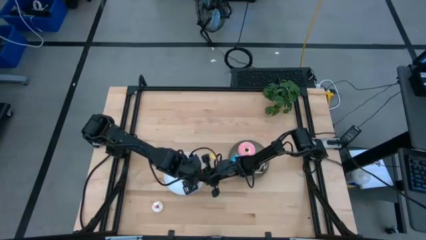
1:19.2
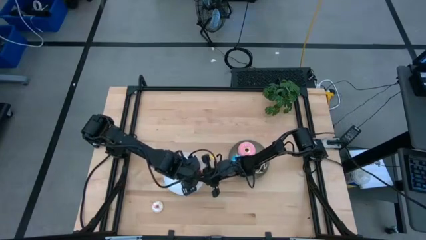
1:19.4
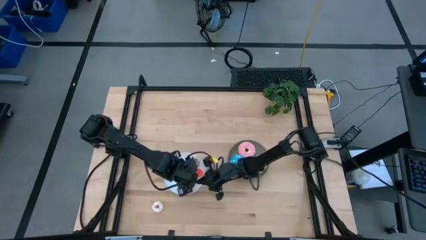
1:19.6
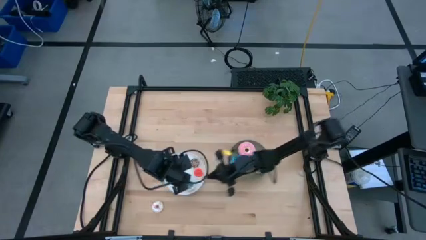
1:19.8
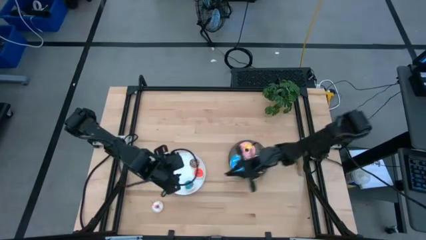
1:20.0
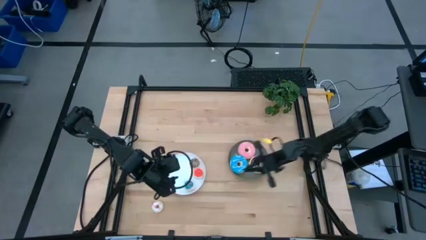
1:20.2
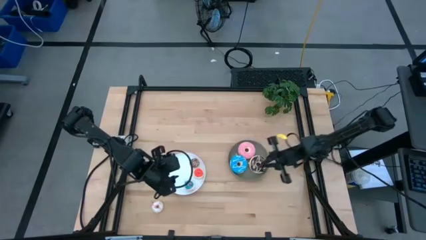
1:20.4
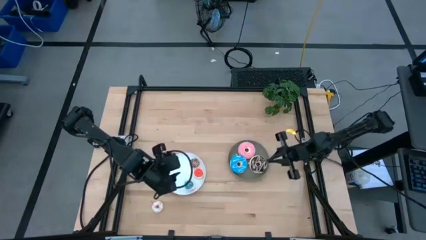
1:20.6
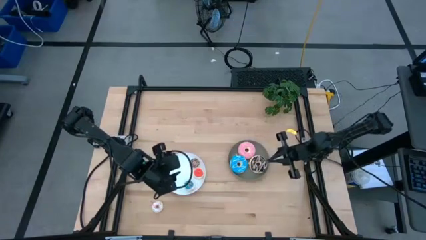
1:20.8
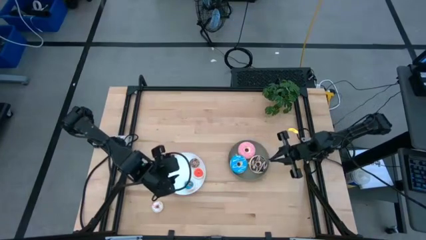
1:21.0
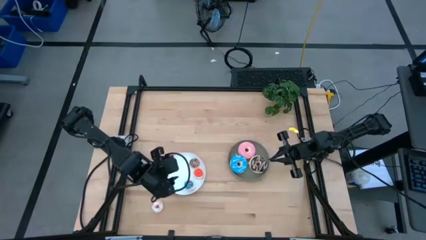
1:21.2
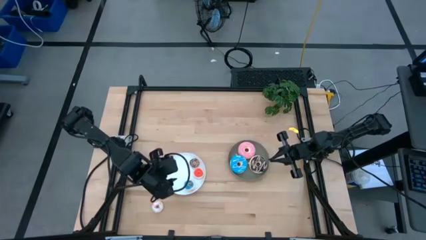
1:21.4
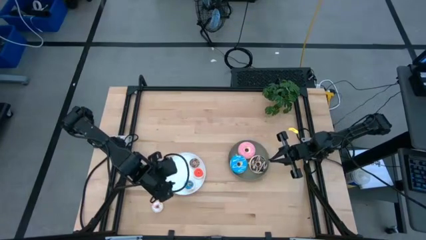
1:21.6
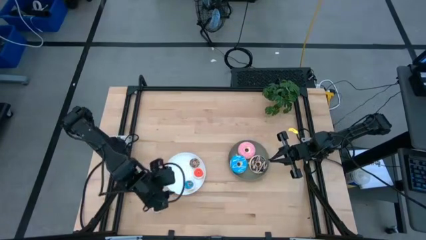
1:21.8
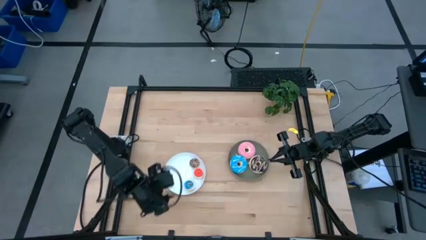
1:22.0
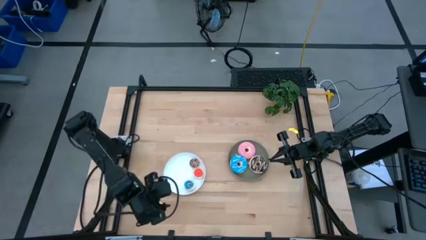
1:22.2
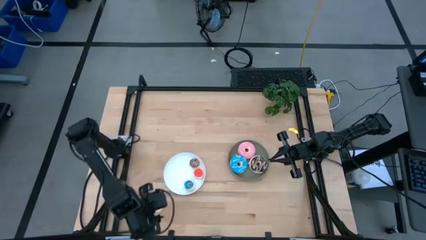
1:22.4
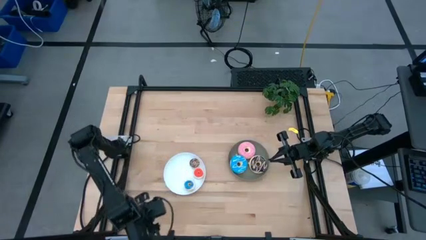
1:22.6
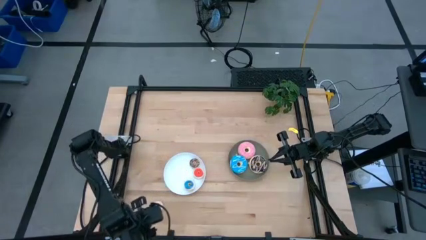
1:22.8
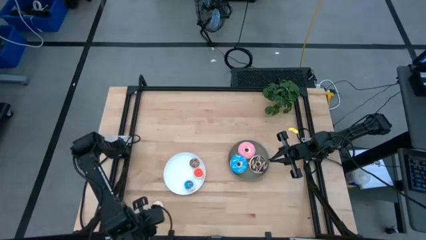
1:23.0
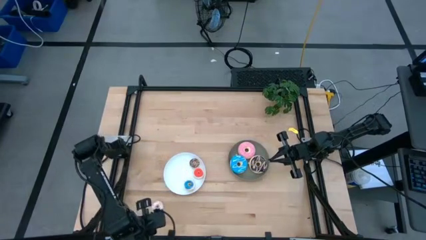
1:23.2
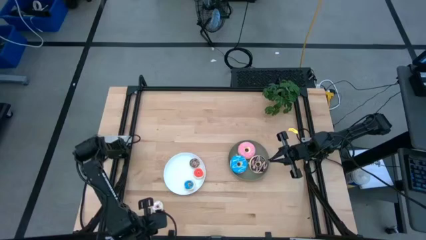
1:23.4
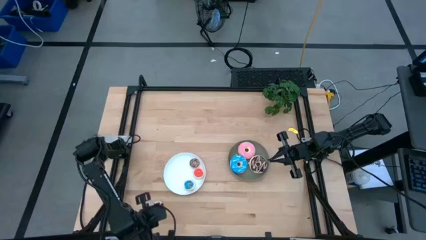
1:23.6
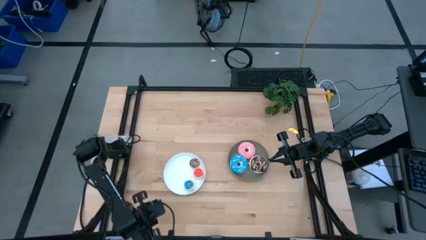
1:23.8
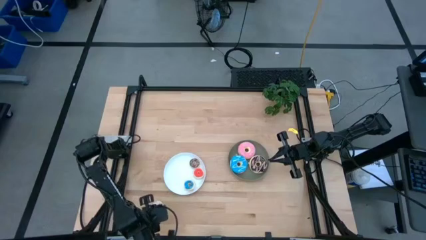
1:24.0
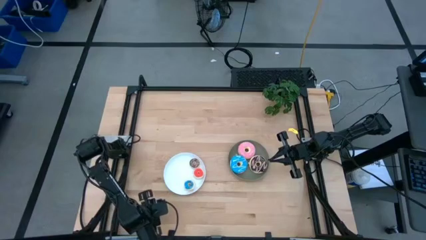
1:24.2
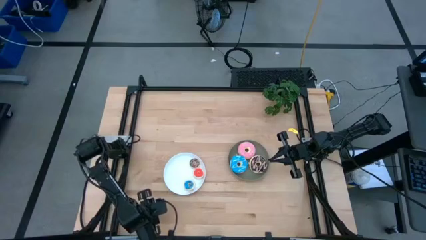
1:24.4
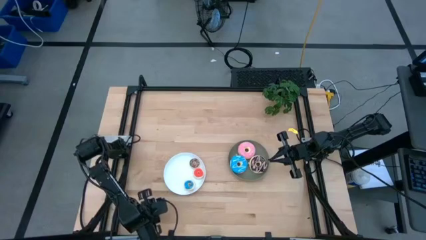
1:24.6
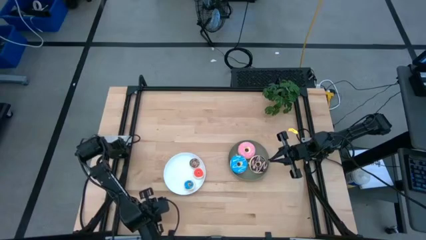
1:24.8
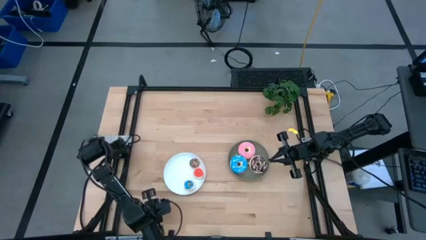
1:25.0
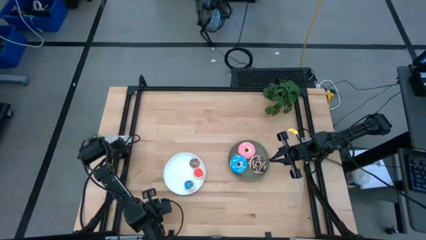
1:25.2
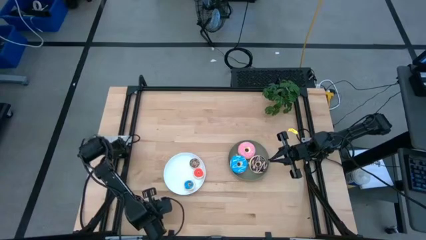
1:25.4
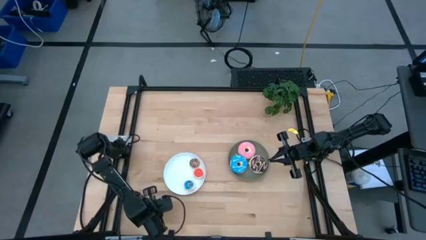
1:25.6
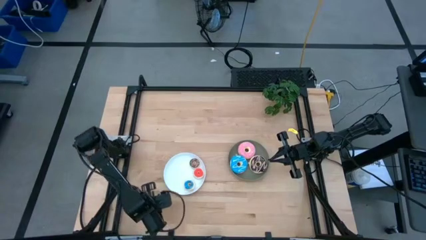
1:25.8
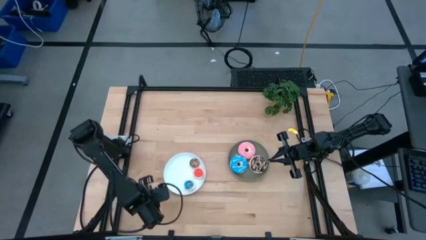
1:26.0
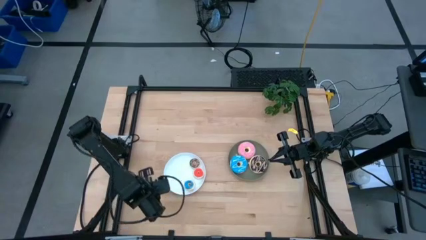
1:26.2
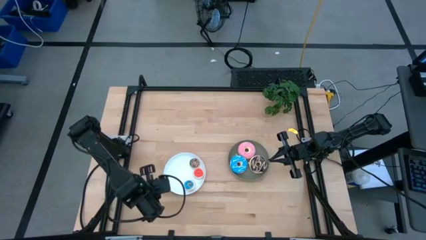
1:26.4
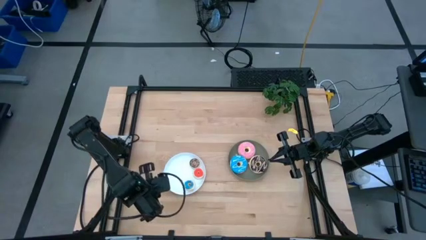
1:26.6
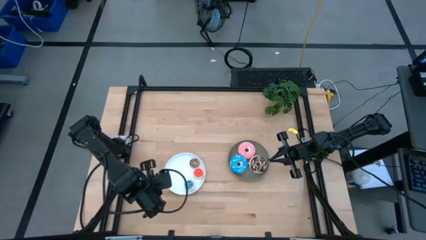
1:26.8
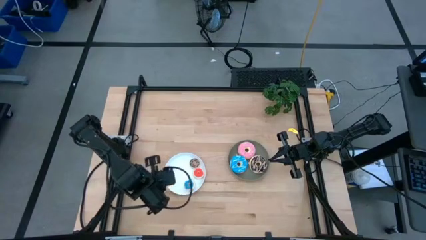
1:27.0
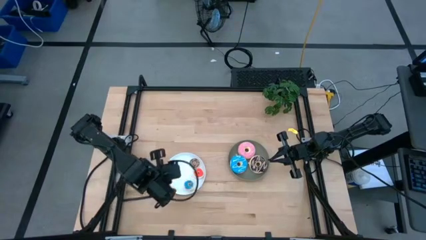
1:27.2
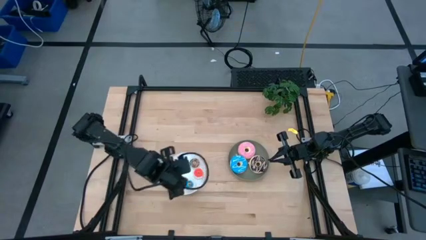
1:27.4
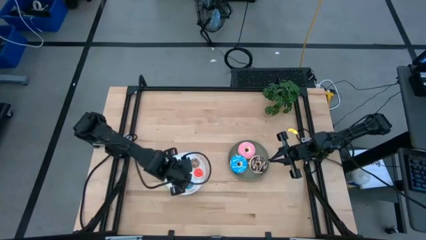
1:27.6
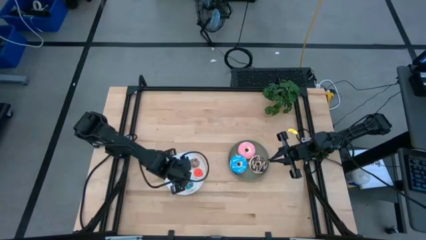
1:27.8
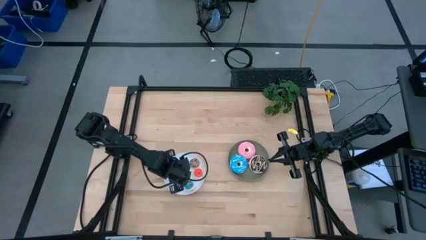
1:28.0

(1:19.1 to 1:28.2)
Task: Pick & Place donuts
Put the small white donut on the white plate

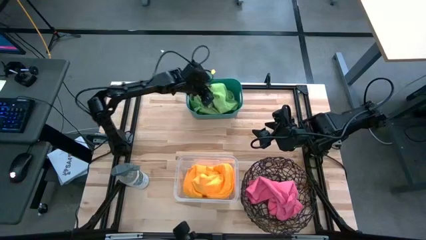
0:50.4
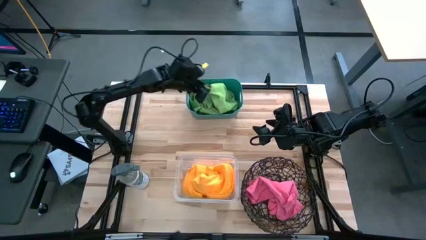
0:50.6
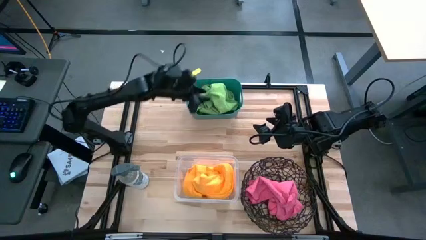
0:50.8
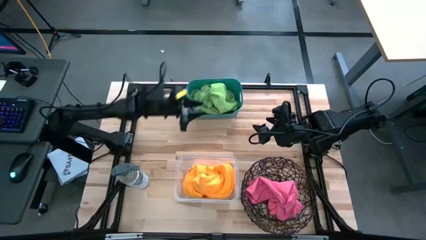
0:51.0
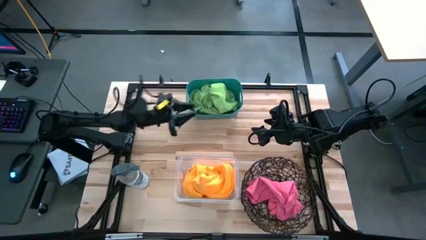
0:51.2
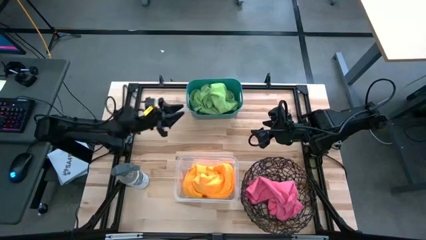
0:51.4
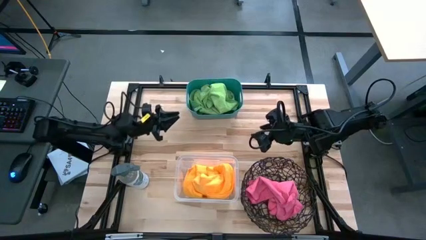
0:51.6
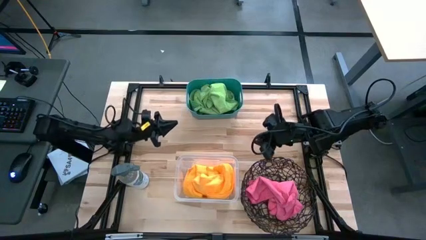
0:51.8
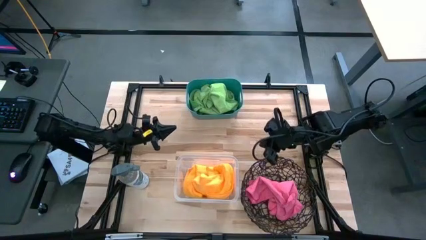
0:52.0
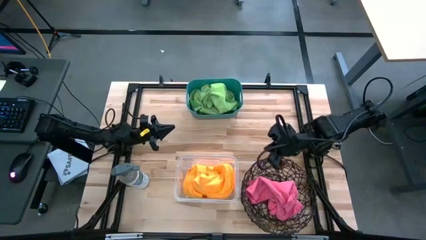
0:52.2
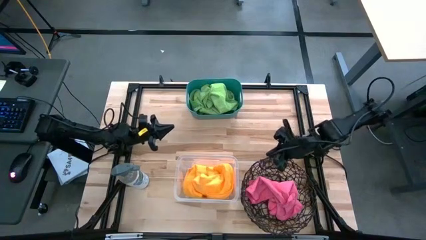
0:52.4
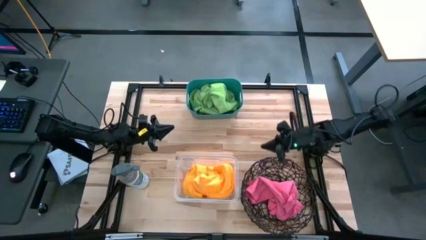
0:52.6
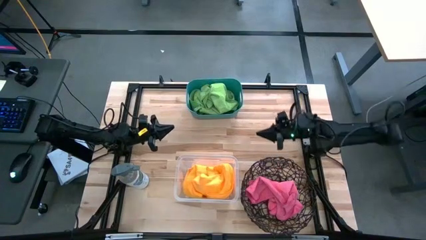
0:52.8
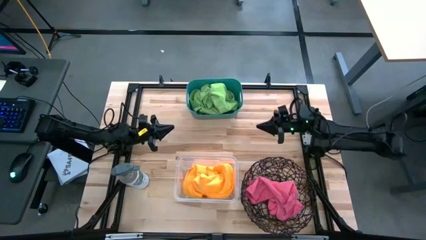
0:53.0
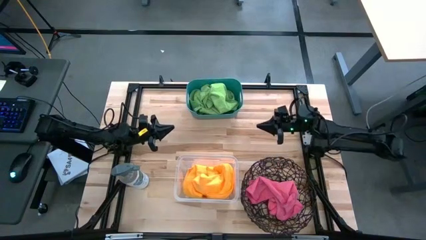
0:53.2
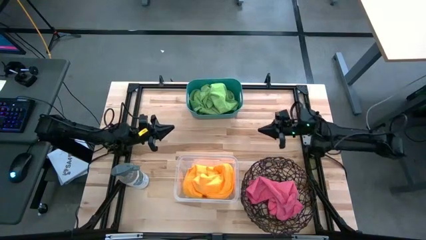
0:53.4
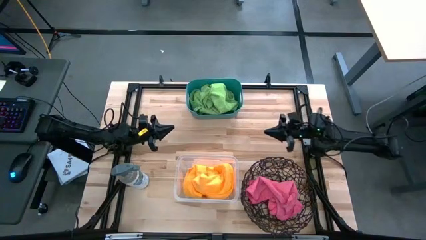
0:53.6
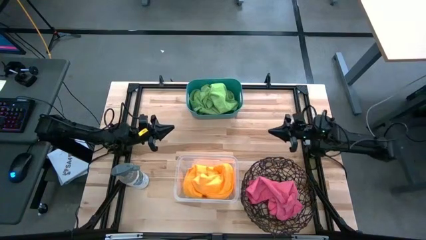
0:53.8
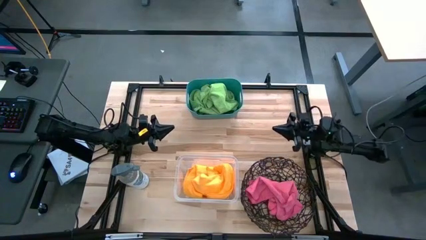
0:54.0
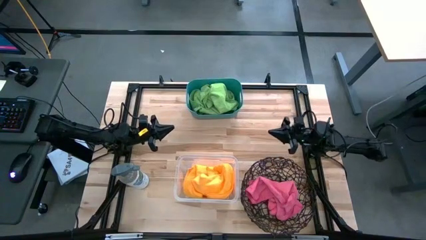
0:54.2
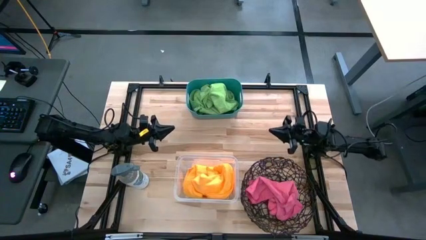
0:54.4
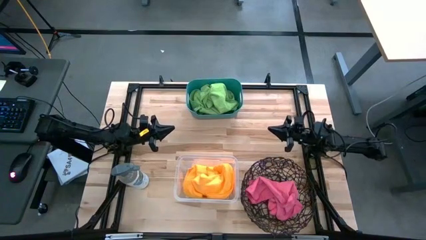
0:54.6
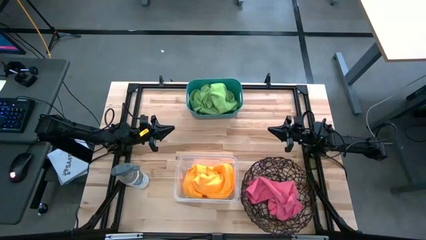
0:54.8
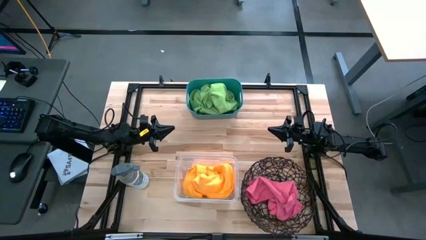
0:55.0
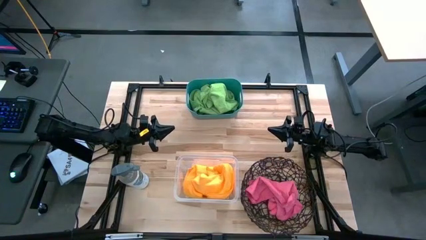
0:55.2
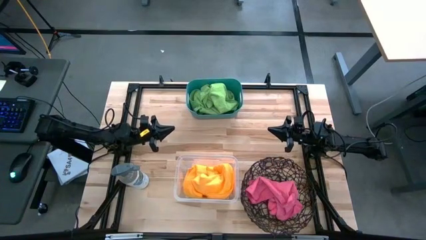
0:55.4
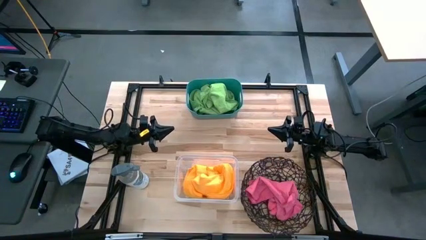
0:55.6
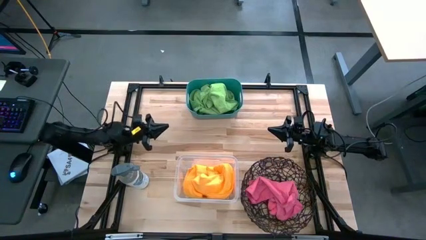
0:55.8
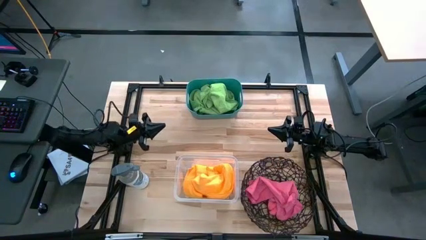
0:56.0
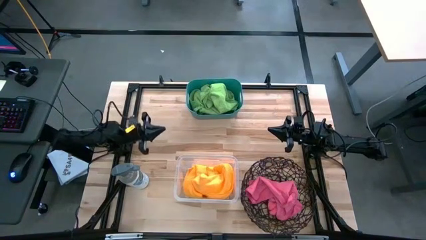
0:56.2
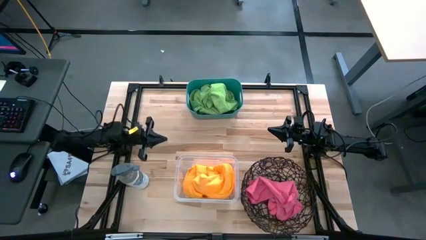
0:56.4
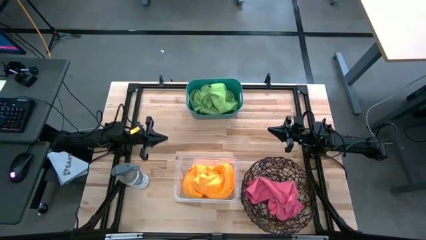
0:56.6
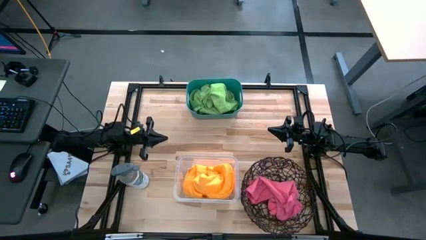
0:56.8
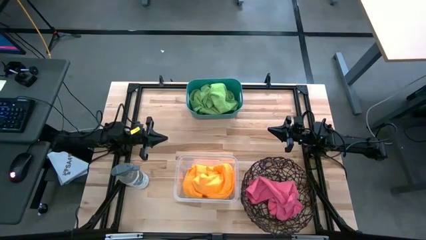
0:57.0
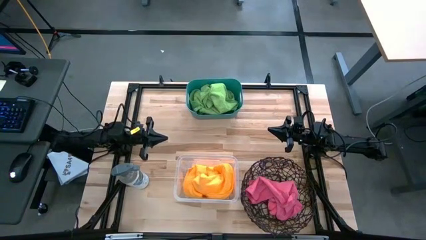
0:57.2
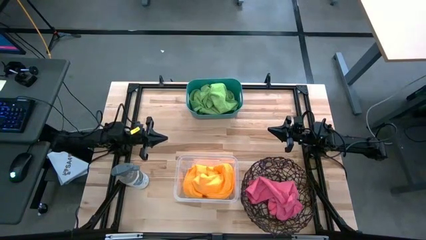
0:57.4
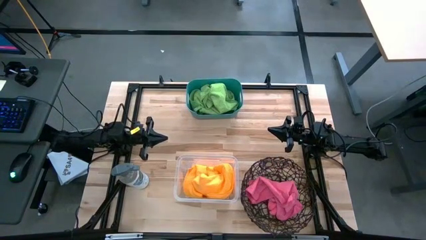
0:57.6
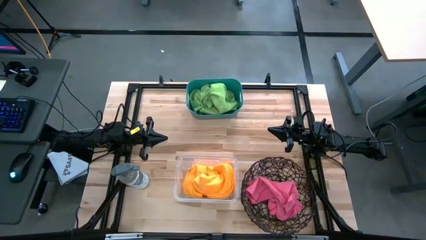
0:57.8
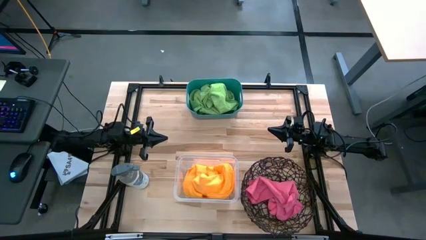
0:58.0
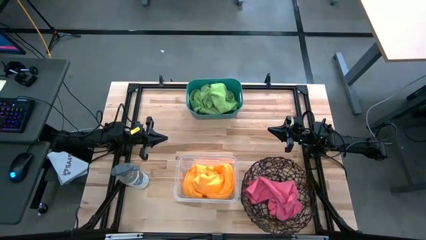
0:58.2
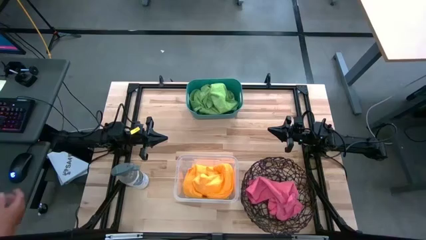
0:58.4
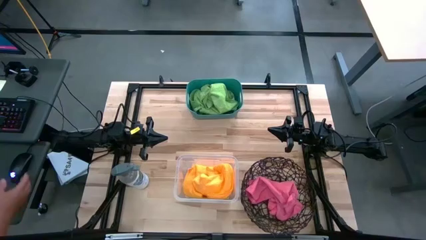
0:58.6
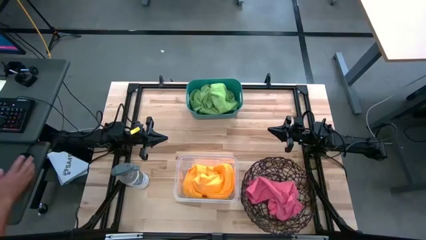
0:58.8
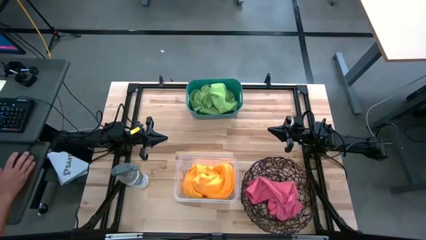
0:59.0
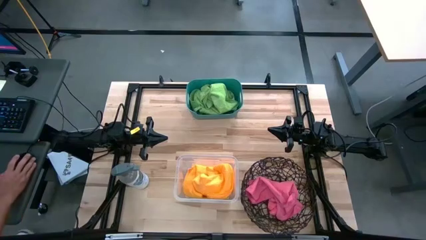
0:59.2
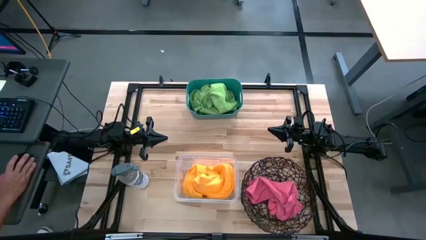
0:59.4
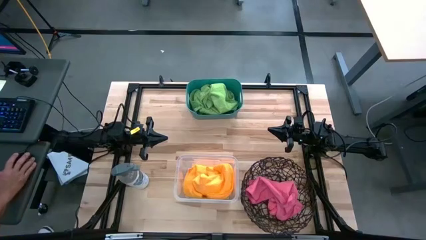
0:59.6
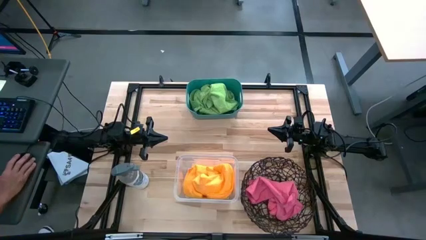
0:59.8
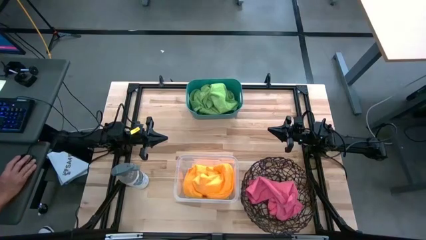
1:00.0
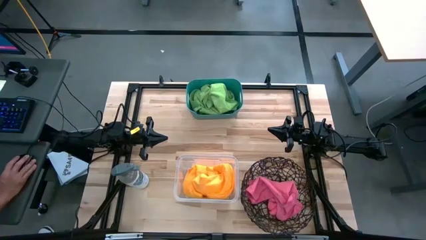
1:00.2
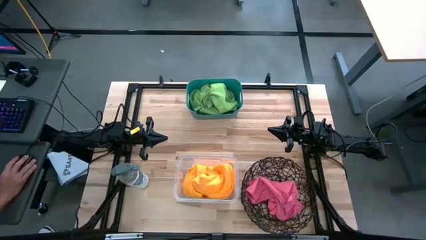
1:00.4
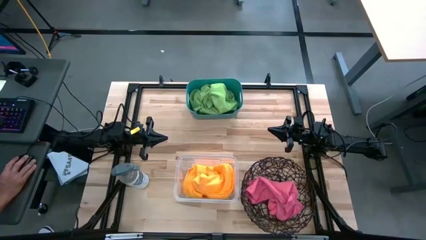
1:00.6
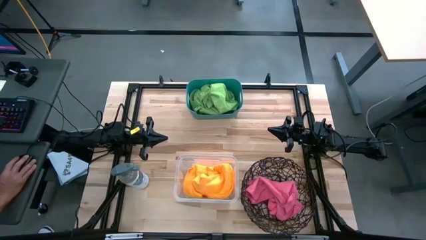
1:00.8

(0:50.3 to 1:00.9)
Task: Sort microfiber towel by color & place in baskets
Return to home position
